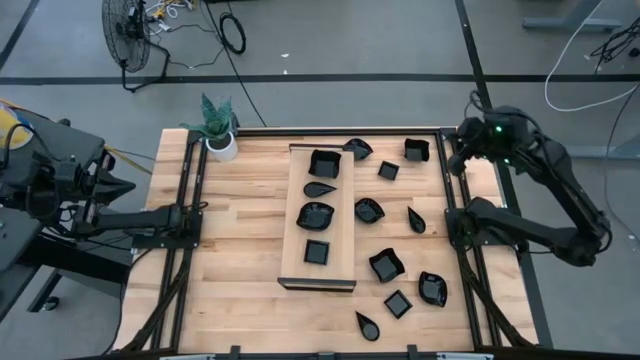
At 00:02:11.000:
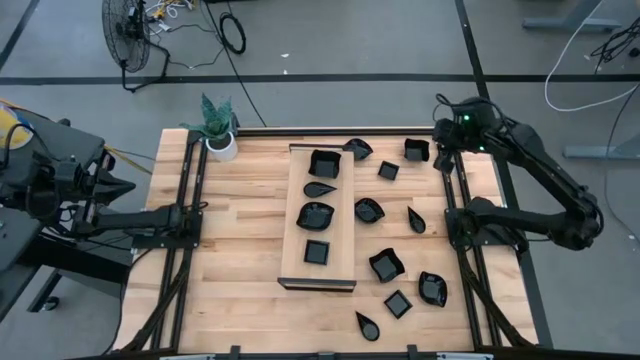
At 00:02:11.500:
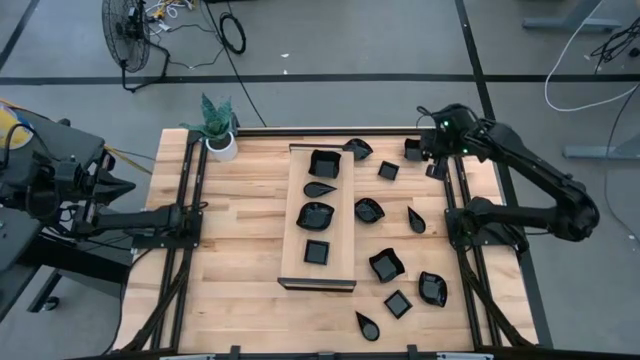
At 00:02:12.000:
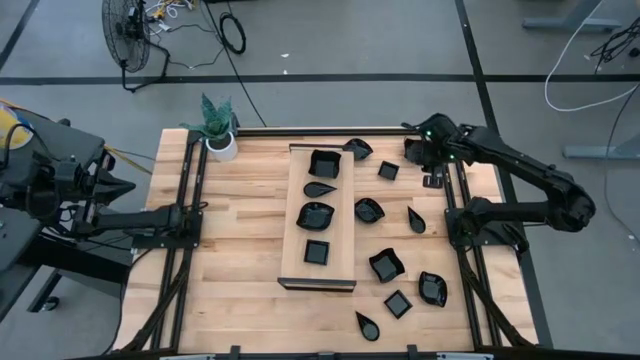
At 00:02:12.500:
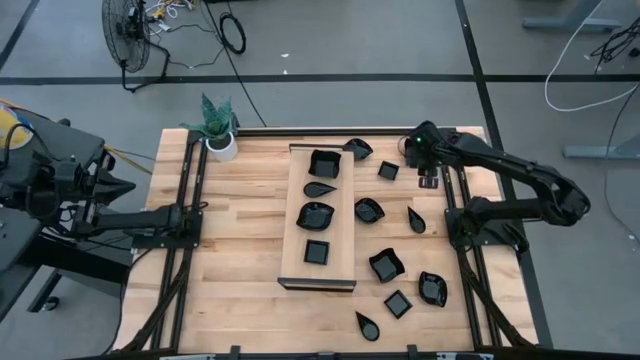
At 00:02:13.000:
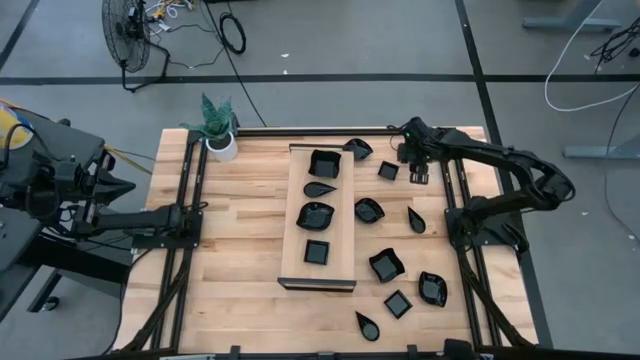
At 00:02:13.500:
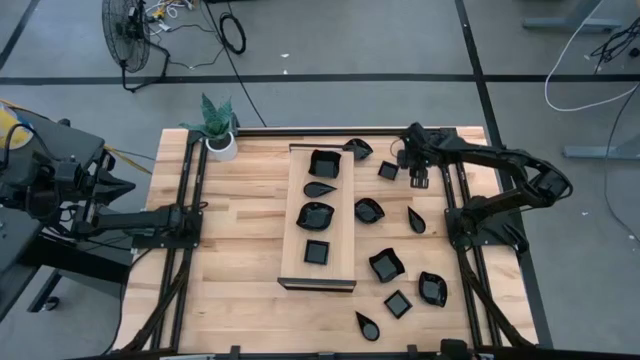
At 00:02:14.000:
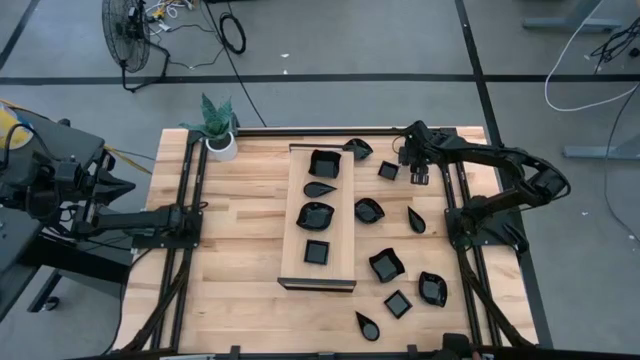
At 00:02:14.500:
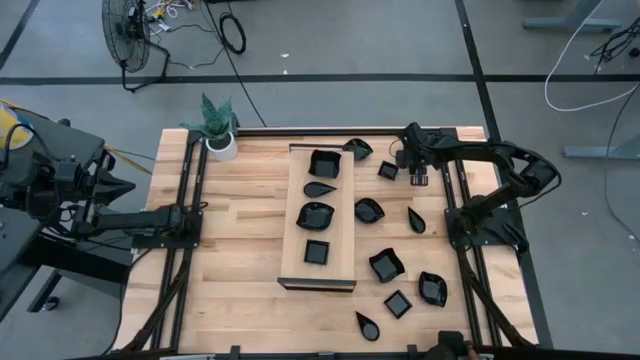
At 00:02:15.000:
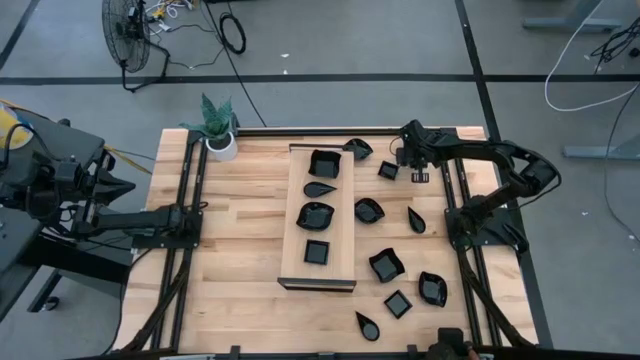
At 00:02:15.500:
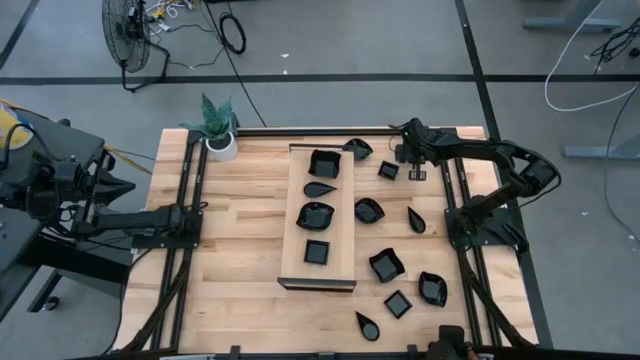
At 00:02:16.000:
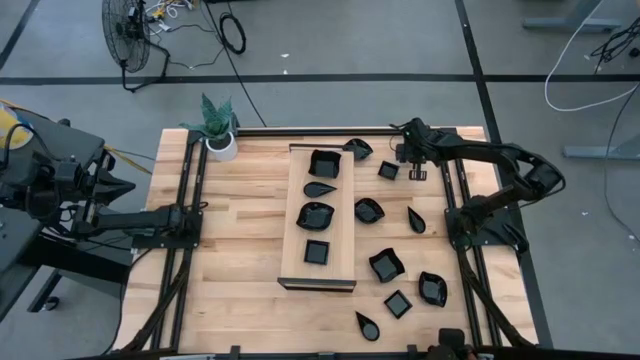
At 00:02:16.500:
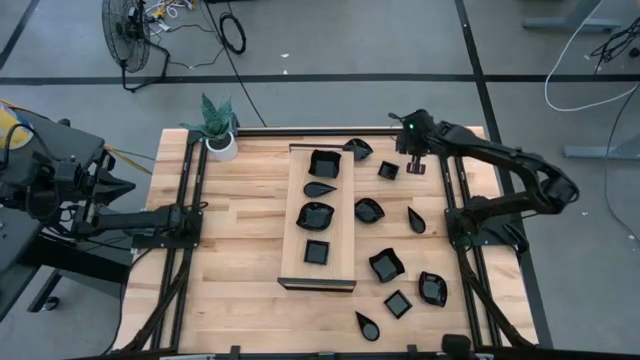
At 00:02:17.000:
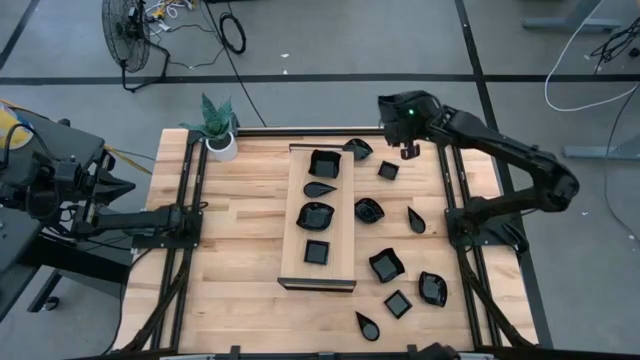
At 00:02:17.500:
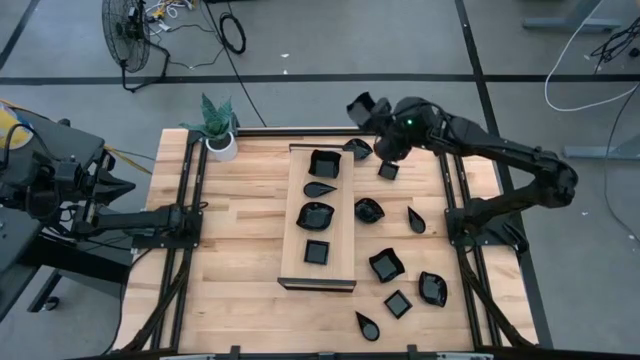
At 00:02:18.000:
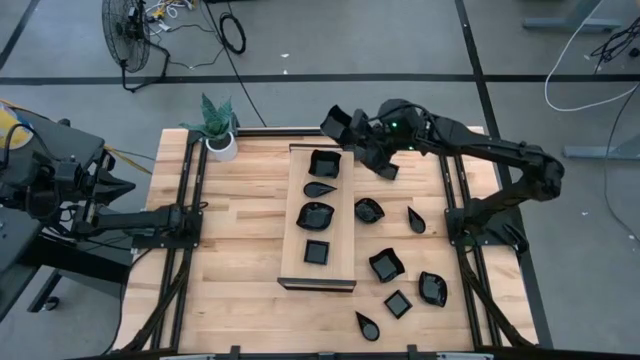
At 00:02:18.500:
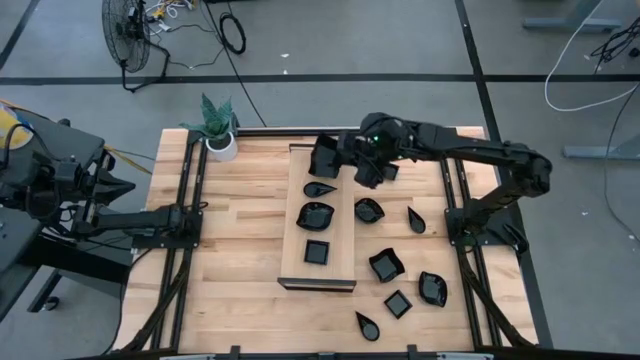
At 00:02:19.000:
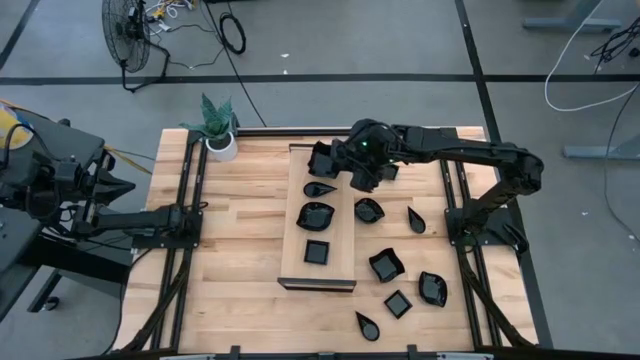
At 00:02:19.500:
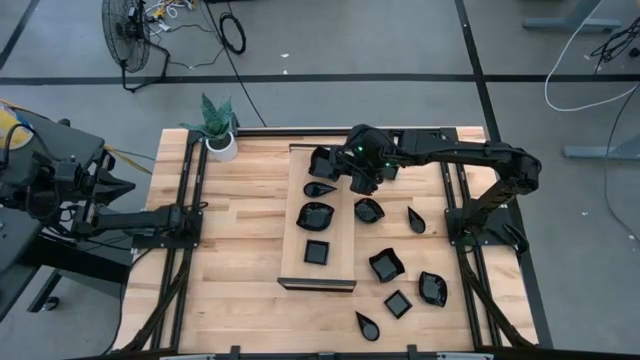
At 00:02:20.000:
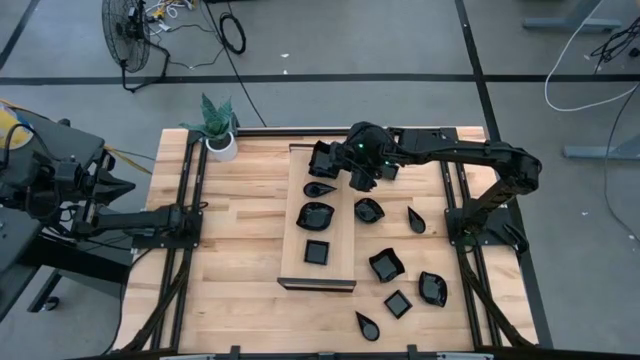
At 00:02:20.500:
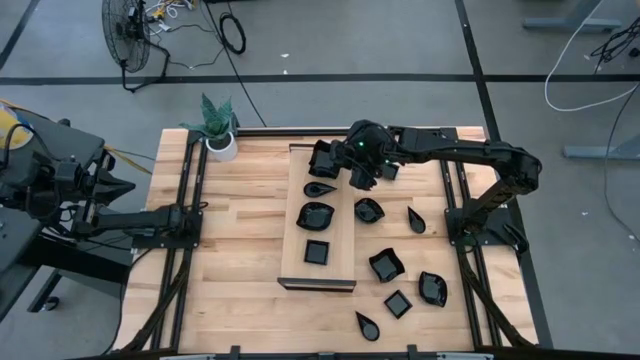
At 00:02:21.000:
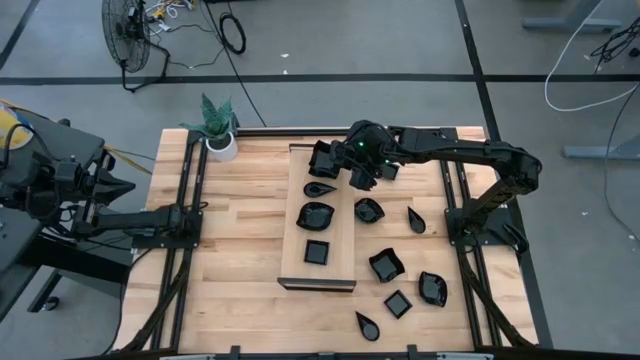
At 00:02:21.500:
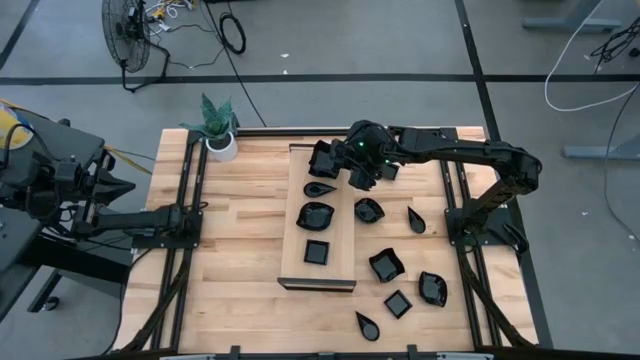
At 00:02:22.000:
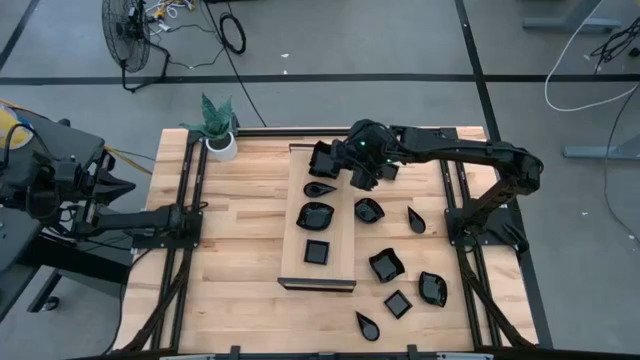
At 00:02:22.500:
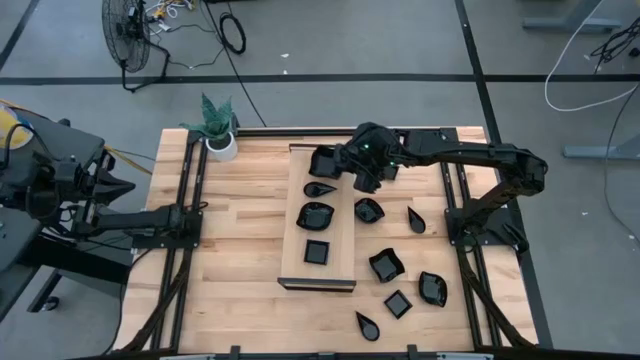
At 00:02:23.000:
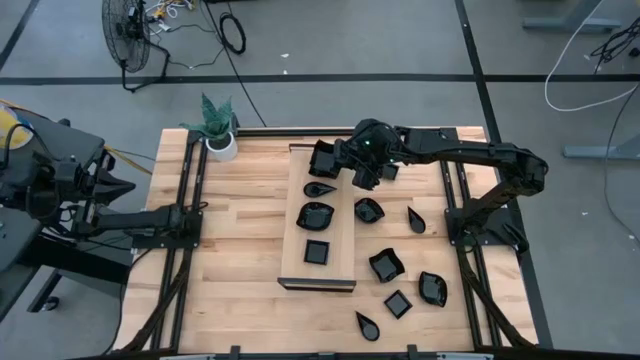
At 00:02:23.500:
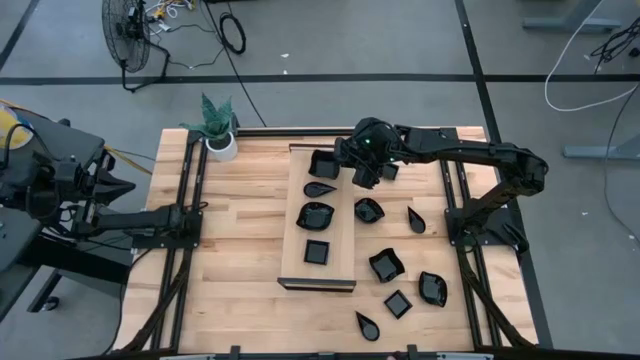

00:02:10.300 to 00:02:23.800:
Task: Pick & Place Mini shaped plates
Stack the distorted square plate on top of the distorted square plate on the shelf

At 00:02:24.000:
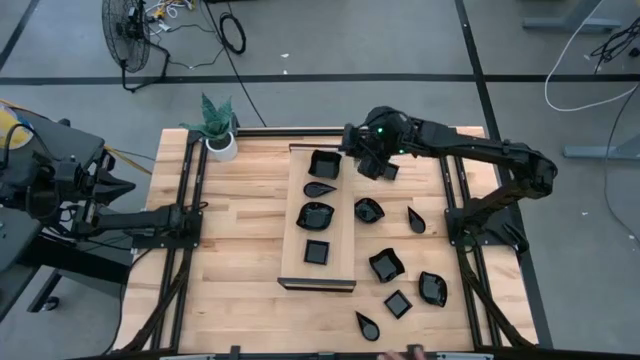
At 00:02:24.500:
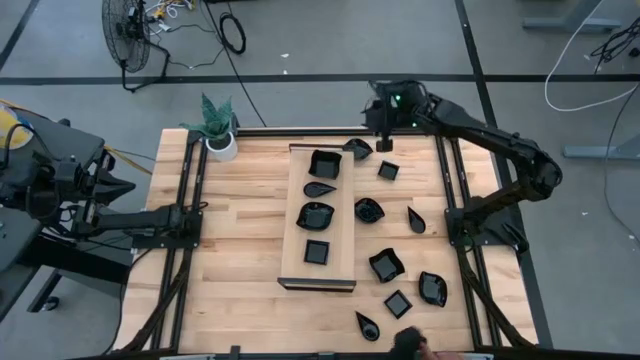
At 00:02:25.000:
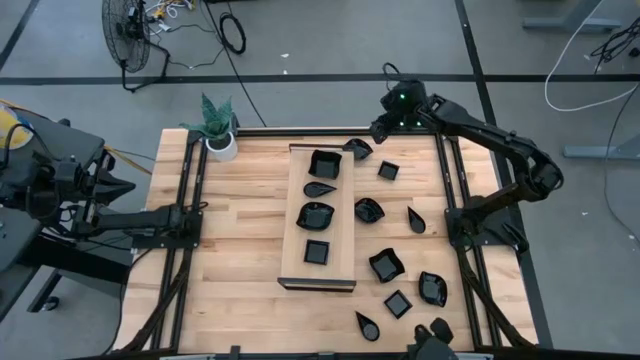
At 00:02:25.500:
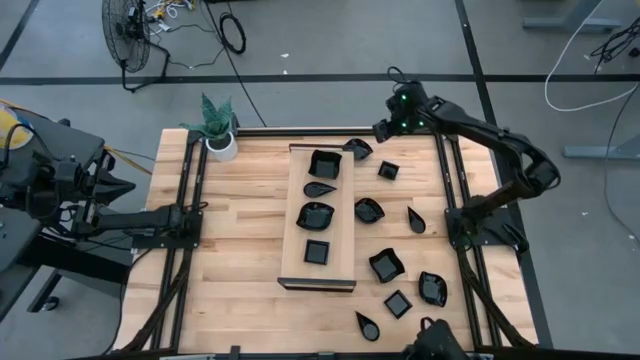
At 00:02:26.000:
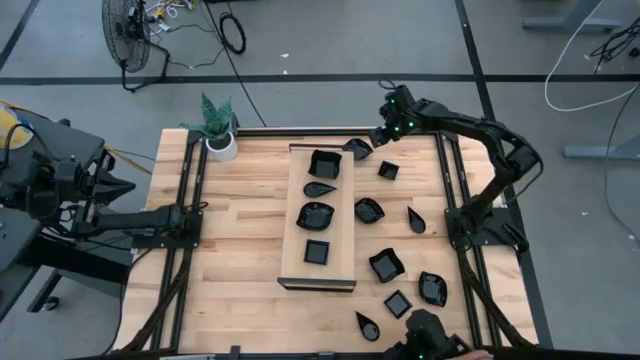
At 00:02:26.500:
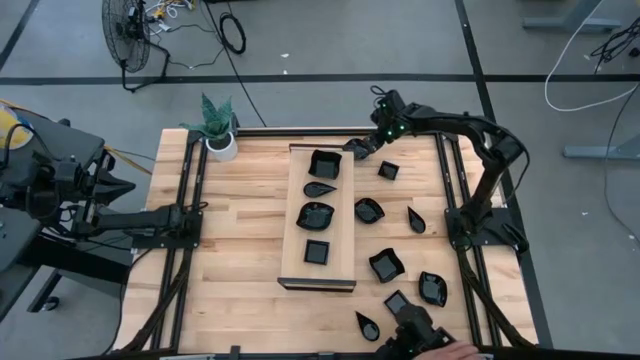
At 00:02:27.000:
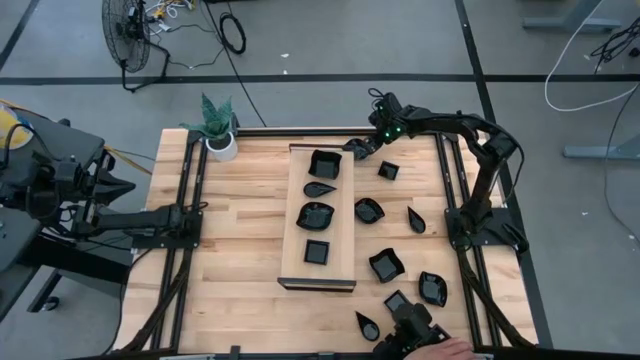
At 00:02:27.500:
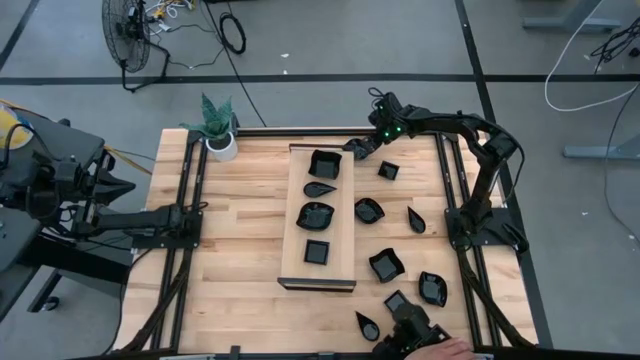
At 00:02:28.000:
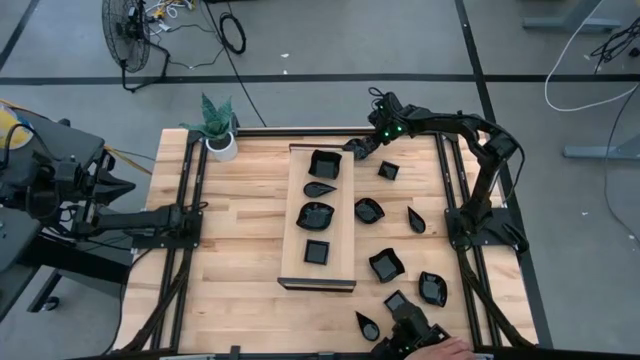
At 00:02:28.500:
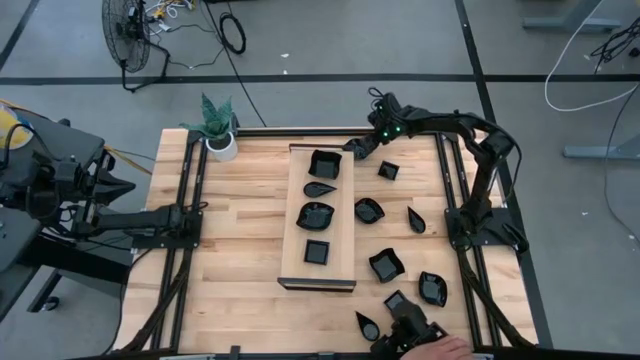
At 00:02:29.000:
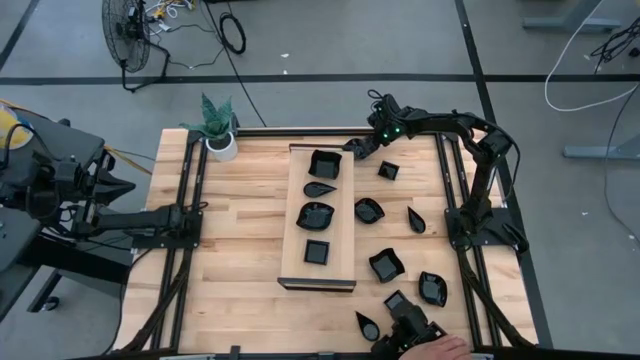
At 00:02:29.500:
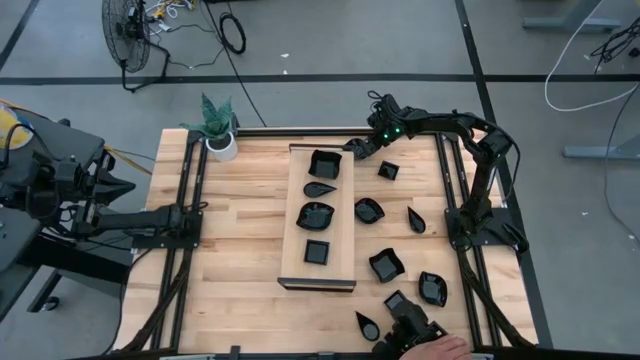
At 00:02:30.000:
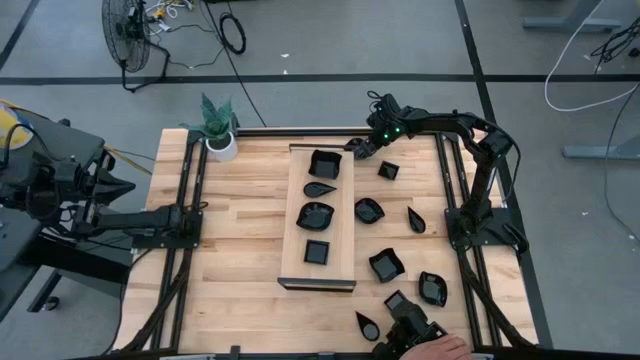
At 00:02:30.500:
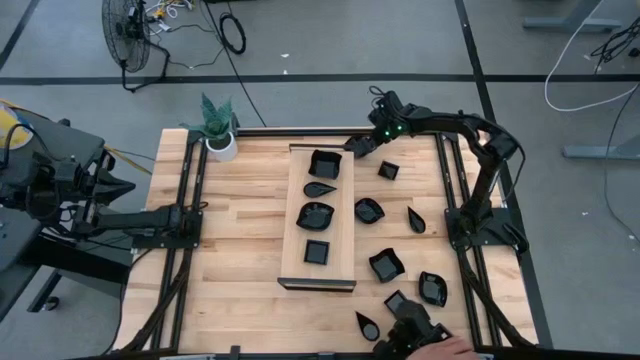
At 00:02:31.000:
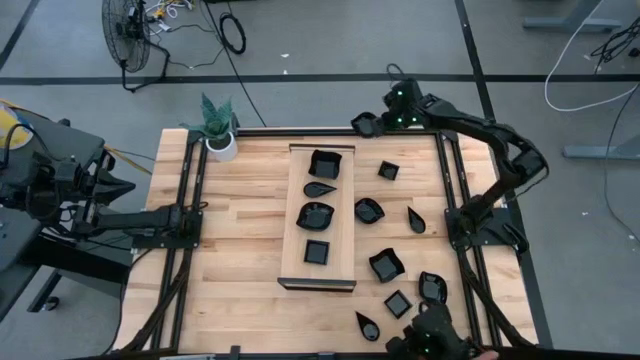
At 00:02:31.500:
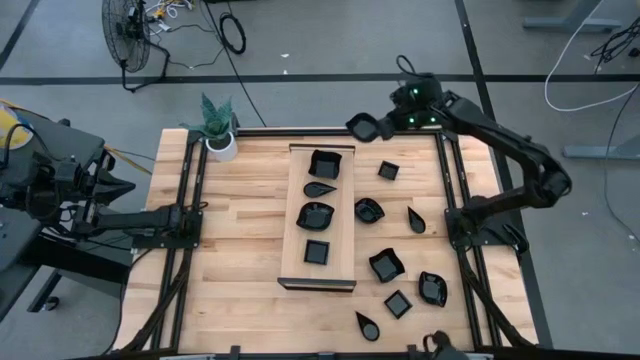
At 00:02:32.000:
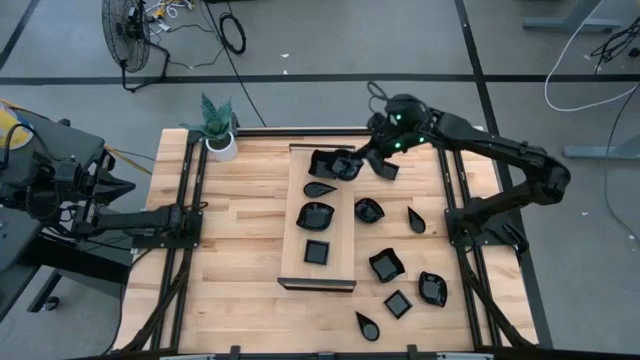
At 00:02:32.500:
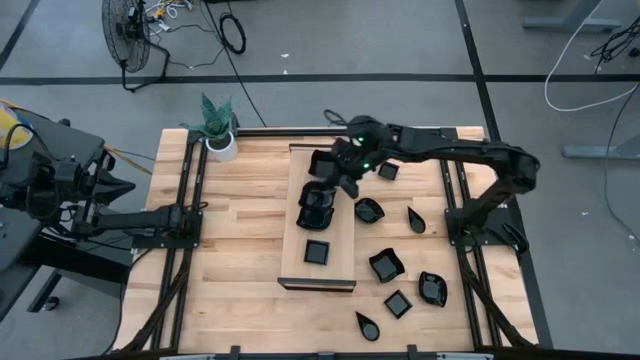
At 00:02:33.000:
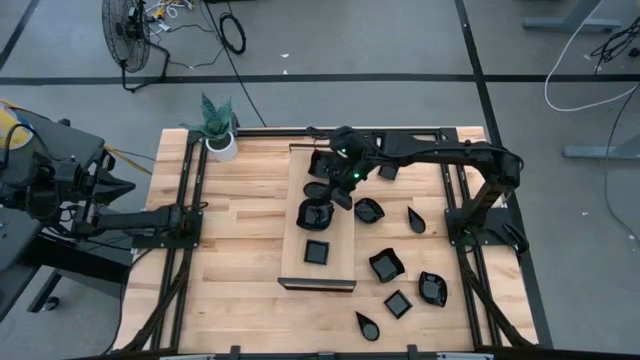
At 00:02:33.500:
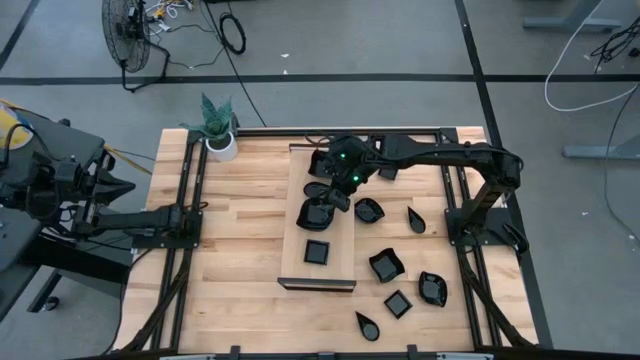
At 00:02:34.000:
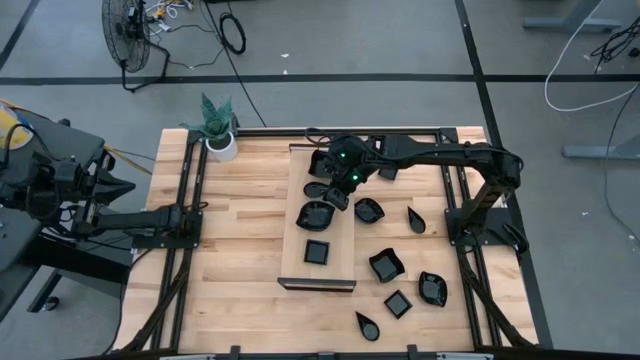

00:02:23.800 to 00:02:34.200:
Stack the leaf shaped plate on top of the leaf shaped plate on the shelf
